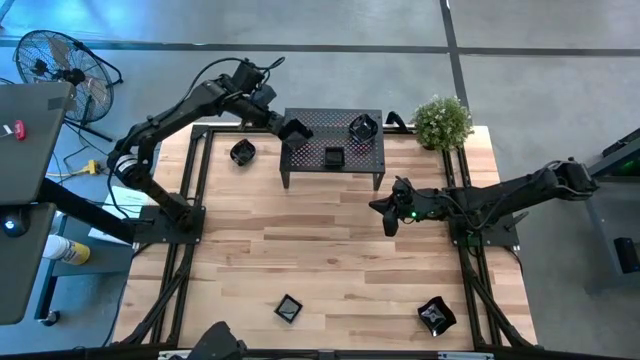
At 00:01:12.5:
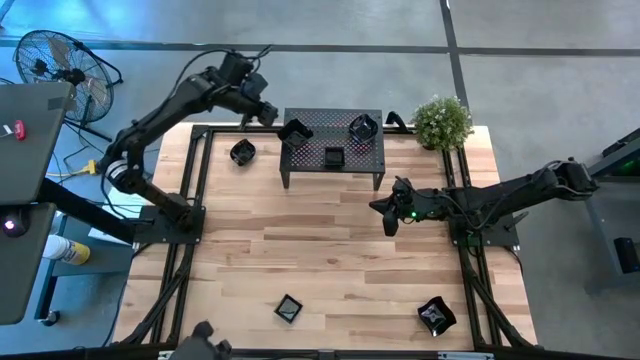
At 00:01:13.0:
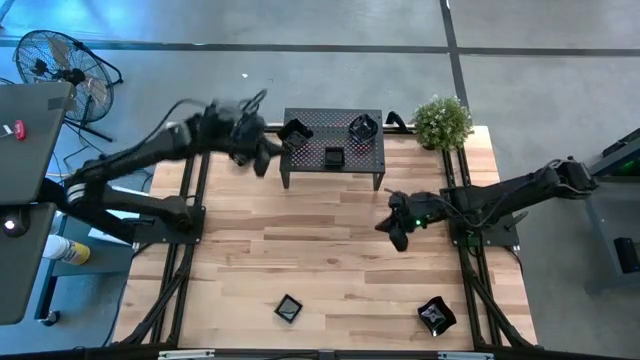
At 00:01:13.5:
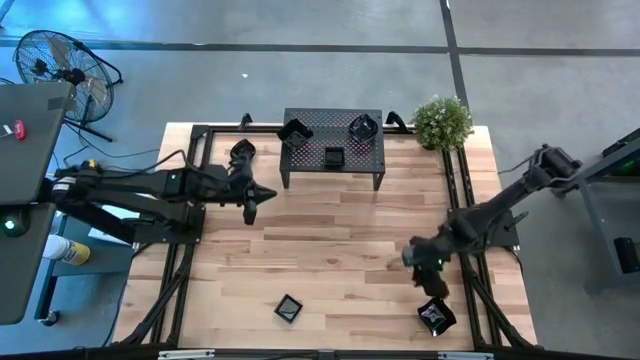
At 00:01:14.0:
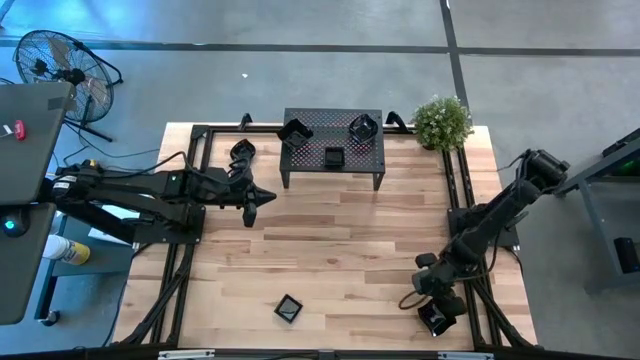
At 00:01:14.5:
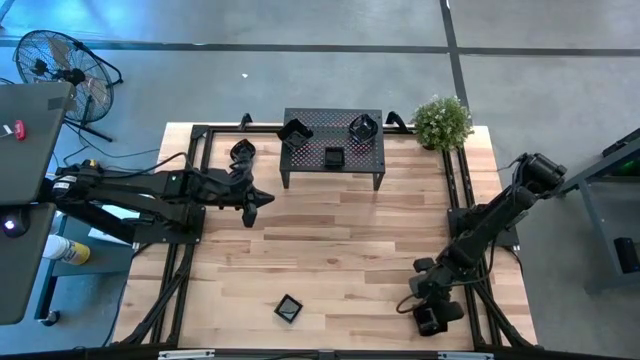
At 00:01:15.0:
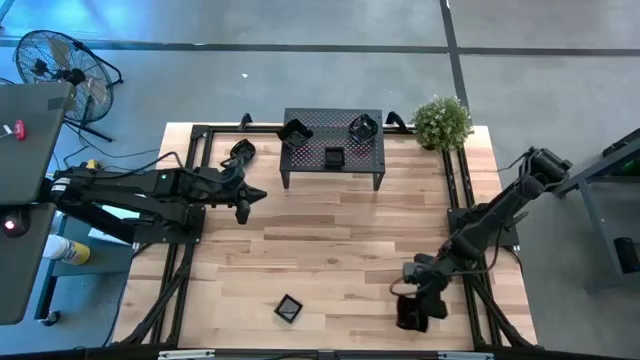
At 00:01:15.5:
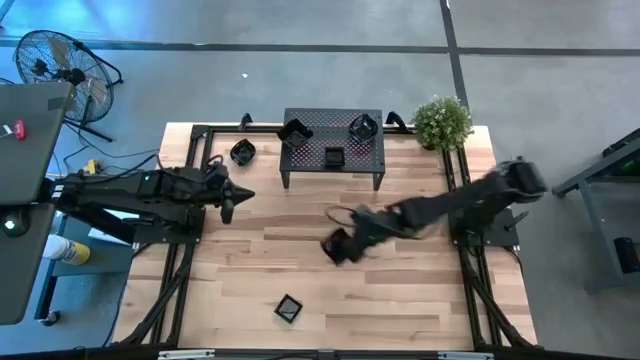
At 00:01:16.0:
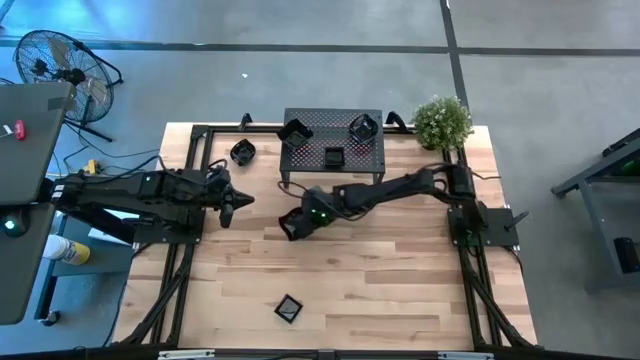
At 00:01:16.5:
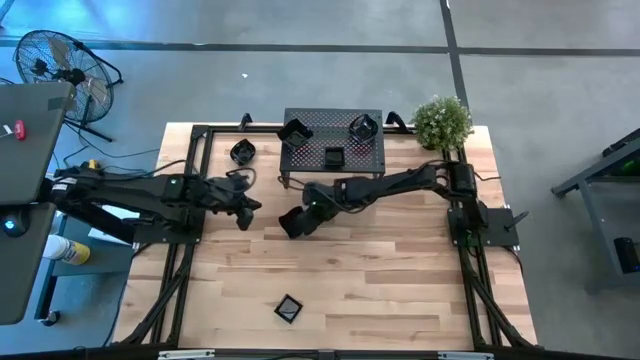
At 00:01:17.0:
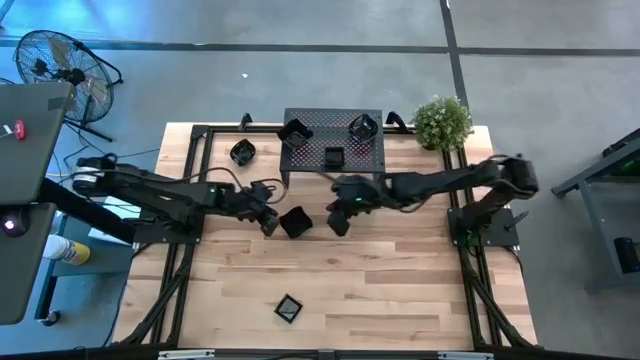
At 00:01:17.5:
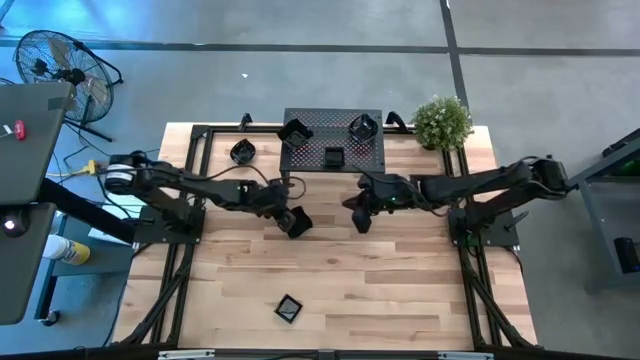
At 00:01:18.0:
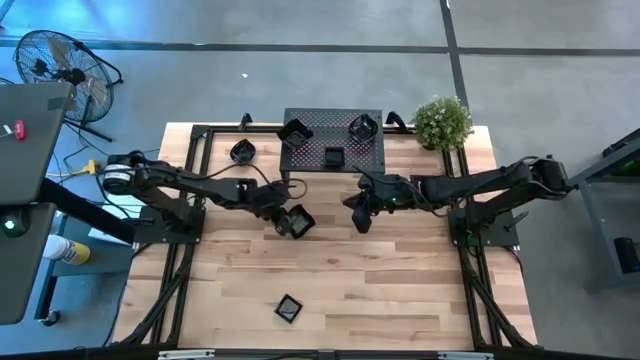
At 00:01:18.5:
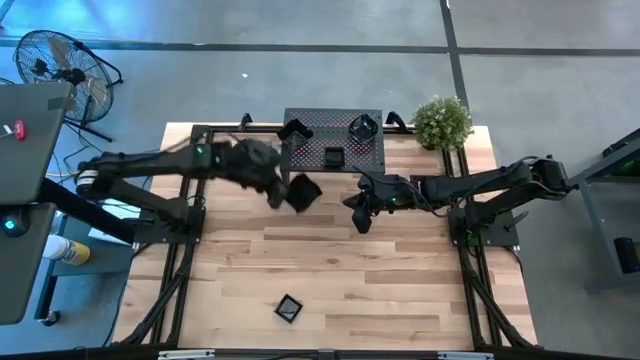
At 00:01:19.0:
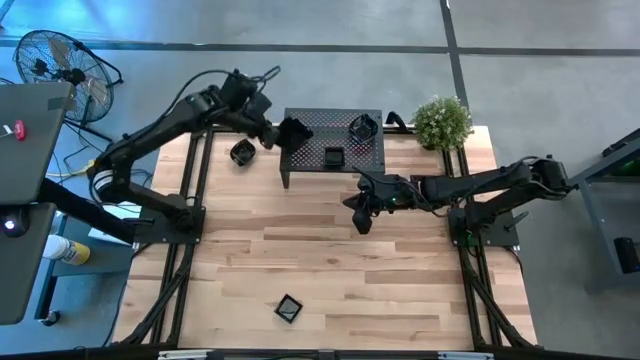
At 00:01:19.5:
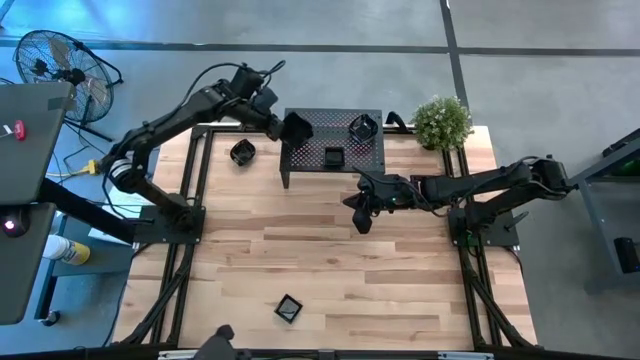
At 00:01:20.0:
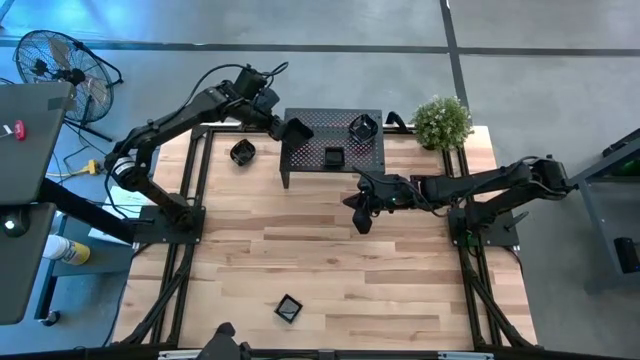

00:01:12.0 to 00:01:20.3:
Task: Pick & Place Mini shaped plates
Stack the black distorted square plate on top of the black distorted square plate on the shelf

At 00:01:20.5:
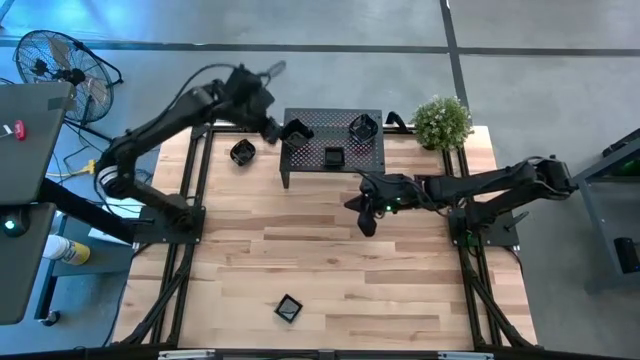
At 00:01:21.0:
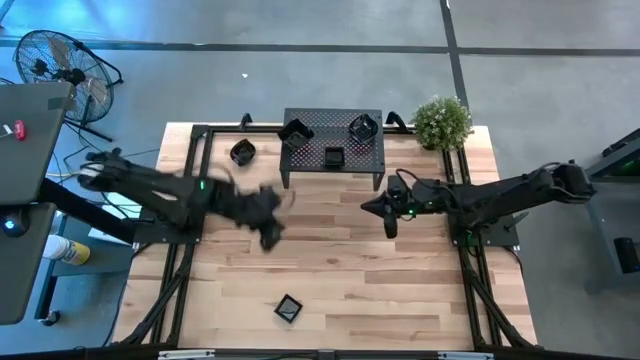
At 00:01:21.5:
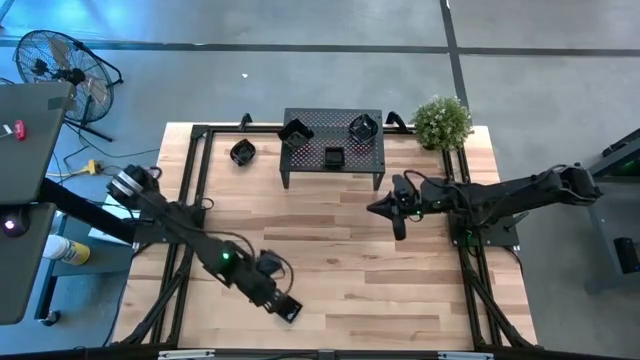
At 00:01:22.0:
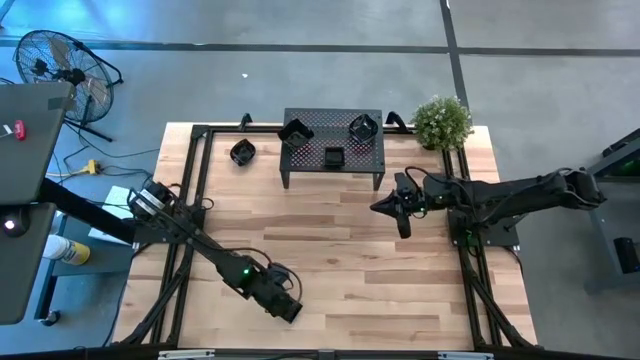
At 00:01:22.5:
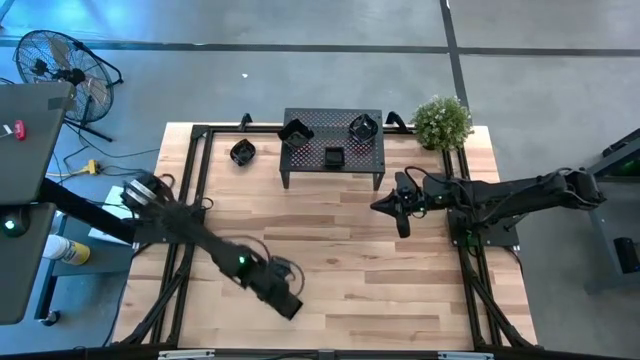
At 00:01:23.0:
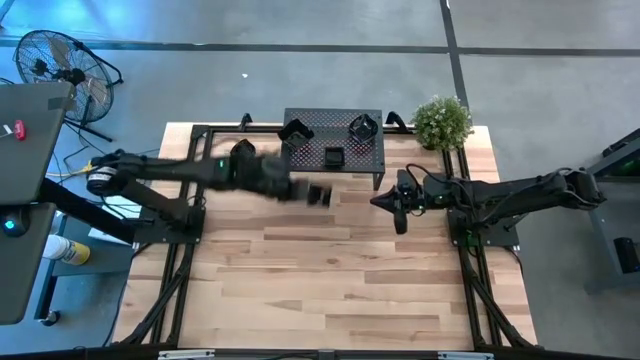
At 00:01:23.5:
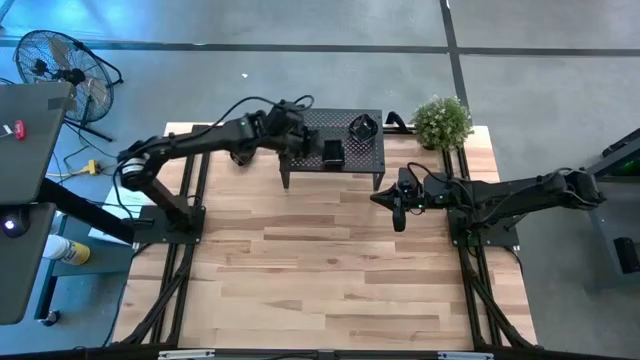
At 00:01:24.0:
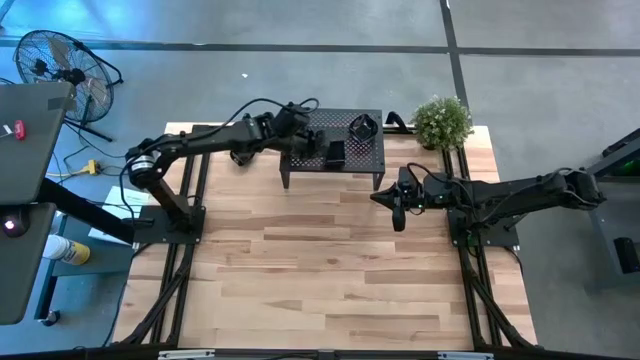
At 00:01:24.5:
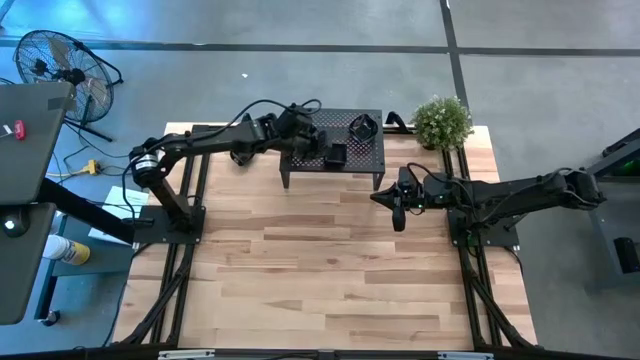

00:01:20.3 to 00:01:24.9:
Stack the black square plate on top of the black square plate on the shelf

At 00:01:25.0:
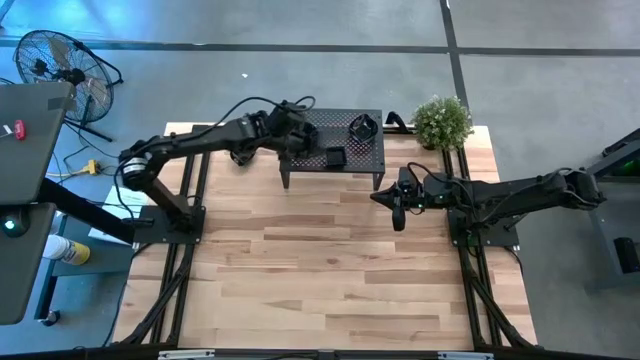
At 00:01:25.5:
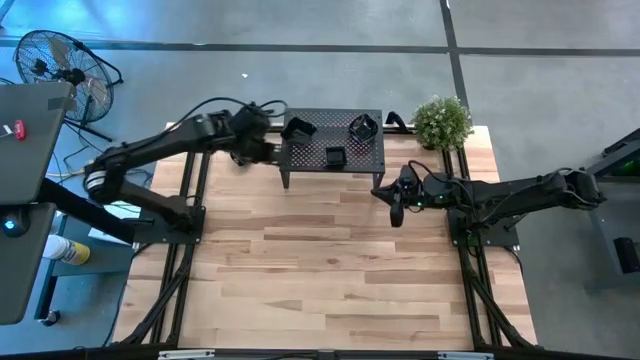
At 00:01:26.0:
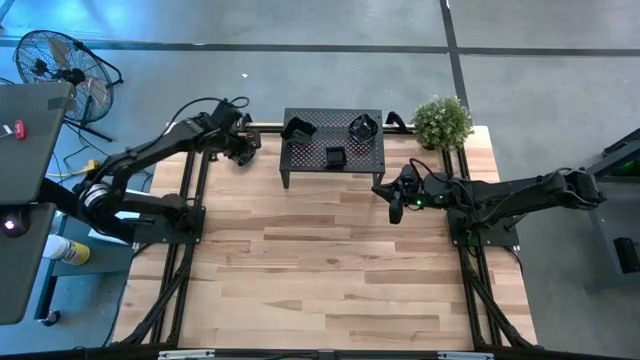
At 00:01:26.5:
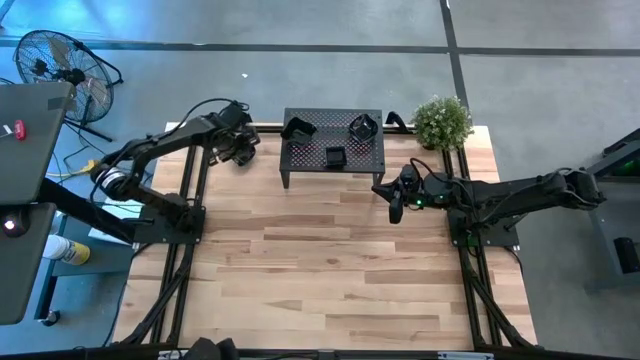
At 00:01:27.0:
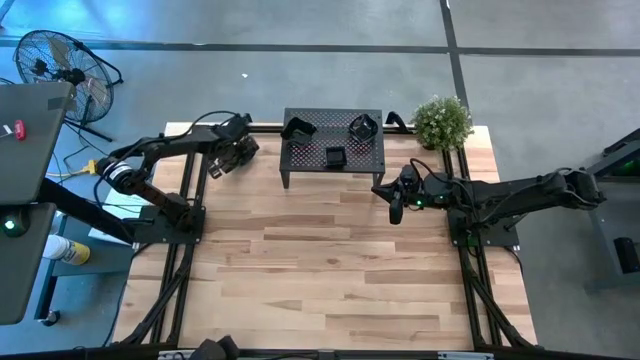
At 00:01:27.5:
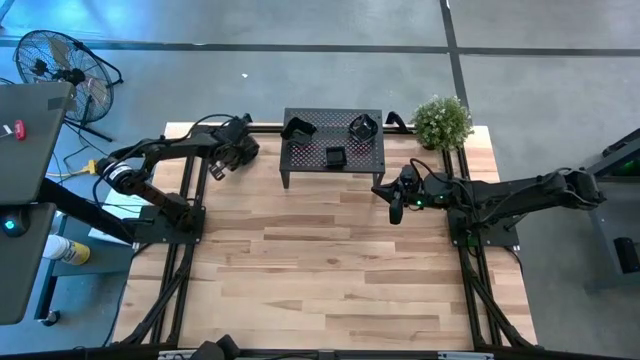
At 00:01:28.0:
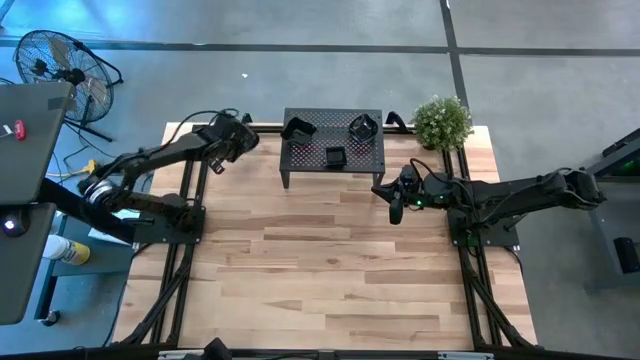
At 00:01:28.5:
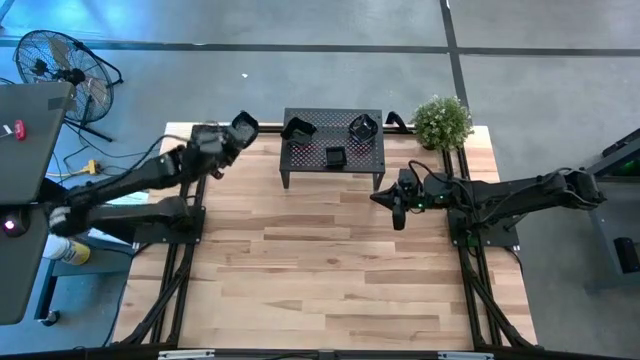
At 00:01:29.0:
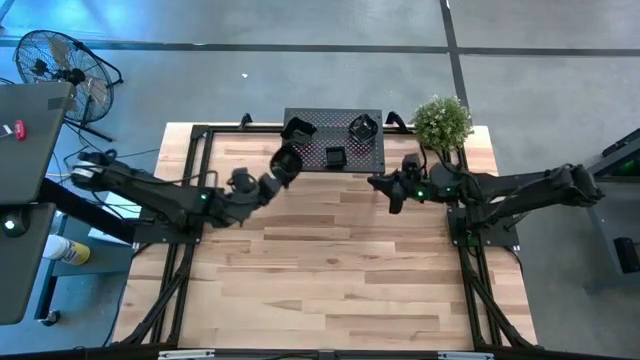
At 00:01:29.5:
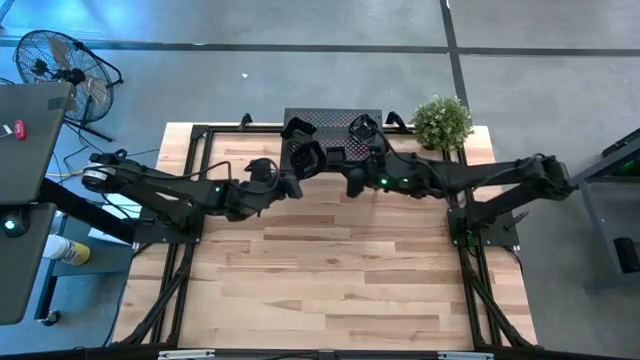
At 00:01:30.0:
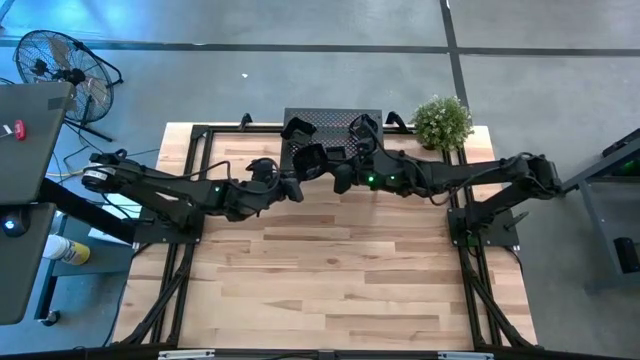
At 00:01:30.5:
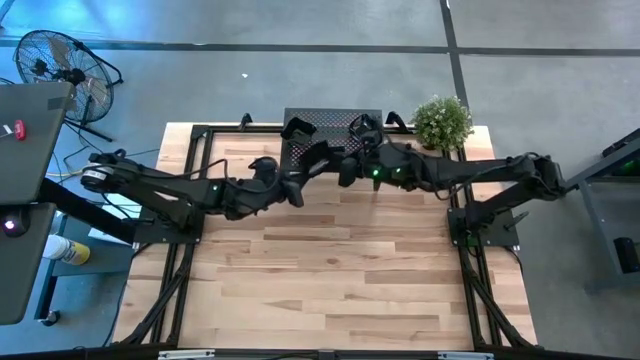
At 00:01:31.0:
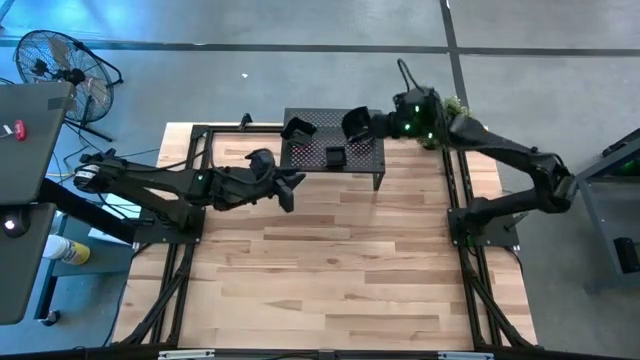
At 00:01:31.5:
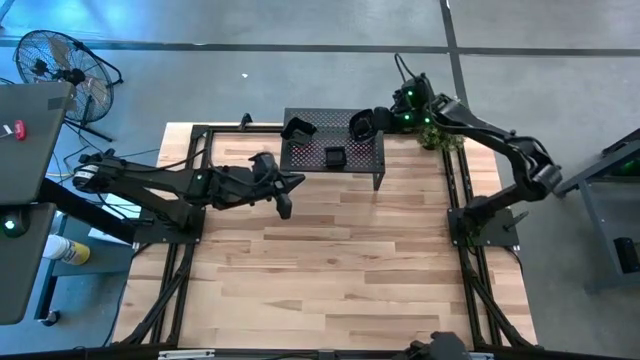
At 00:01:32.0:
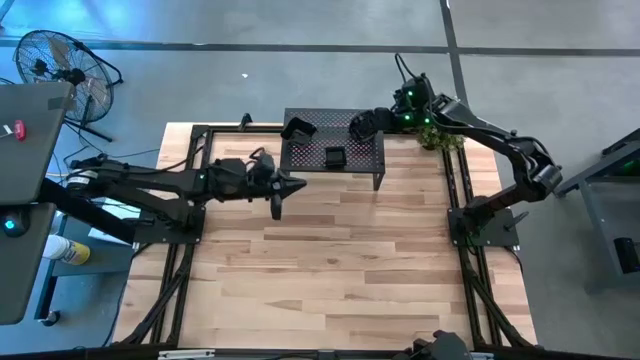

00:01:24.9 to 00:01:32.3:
Stack the black leaf shaped plate on top of the black leaf shaped plate on the shelf
